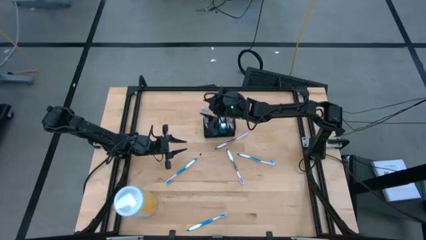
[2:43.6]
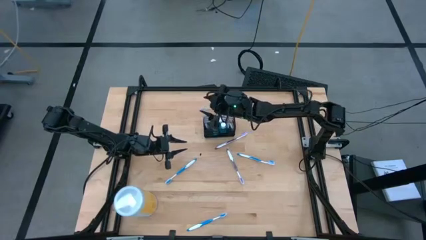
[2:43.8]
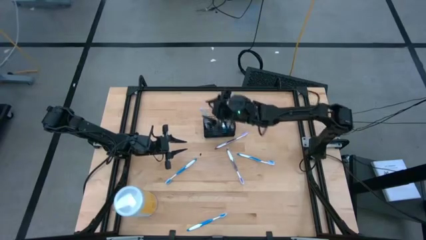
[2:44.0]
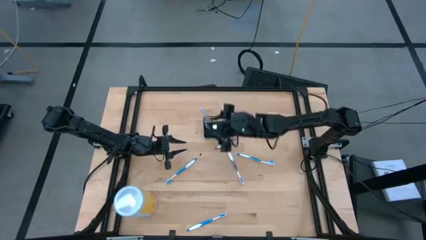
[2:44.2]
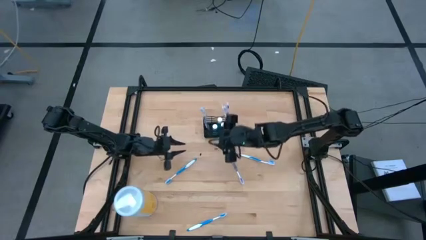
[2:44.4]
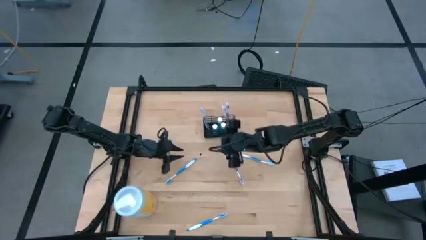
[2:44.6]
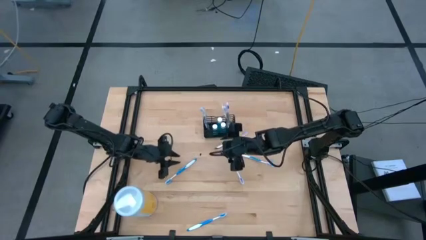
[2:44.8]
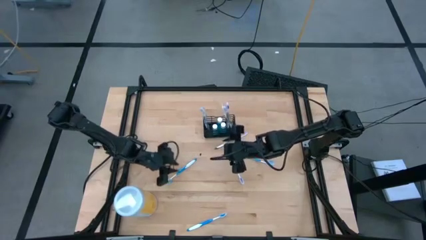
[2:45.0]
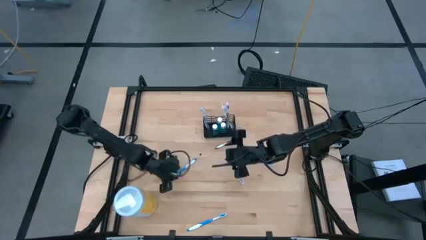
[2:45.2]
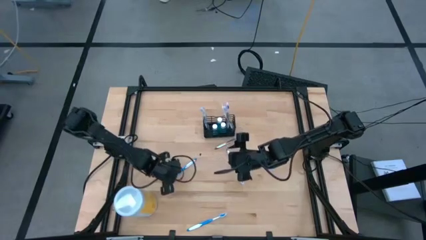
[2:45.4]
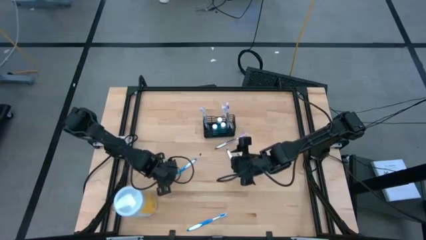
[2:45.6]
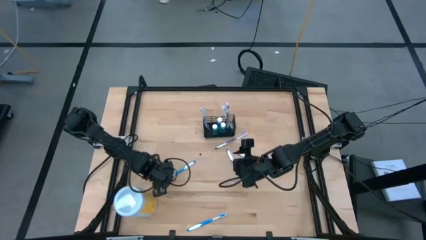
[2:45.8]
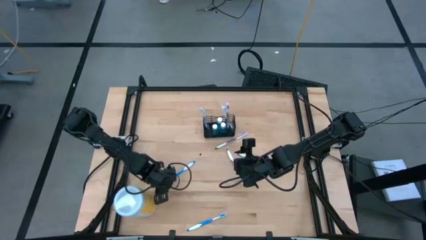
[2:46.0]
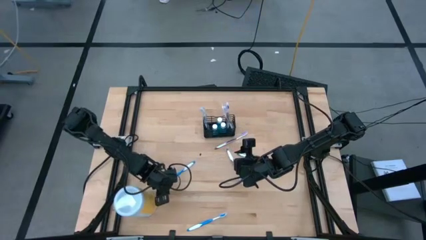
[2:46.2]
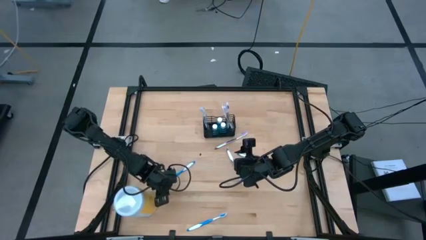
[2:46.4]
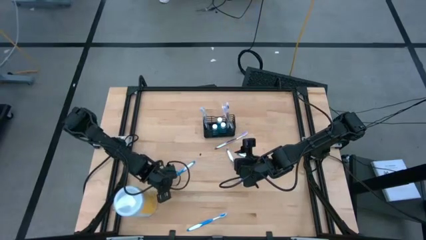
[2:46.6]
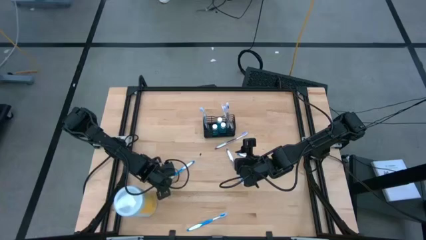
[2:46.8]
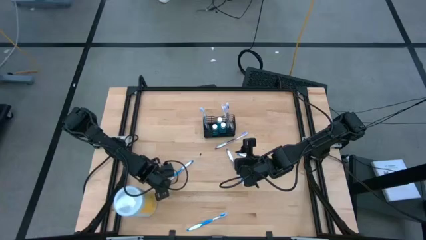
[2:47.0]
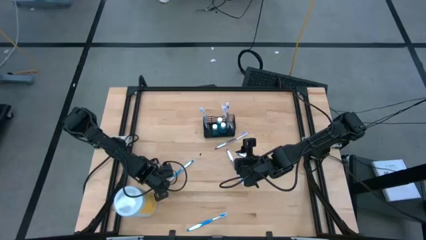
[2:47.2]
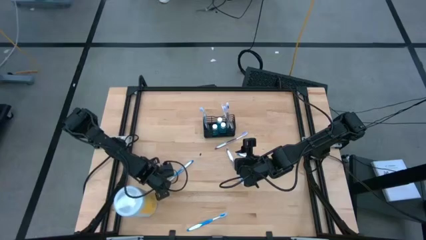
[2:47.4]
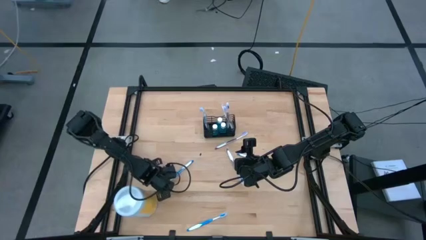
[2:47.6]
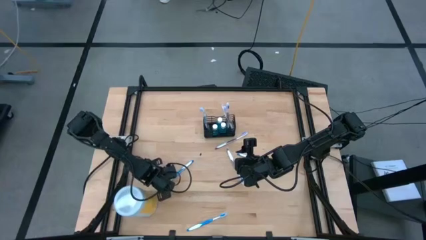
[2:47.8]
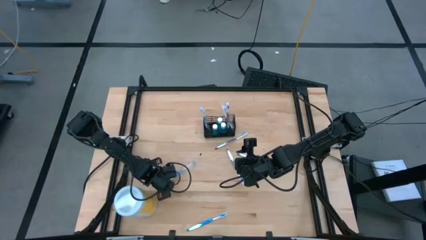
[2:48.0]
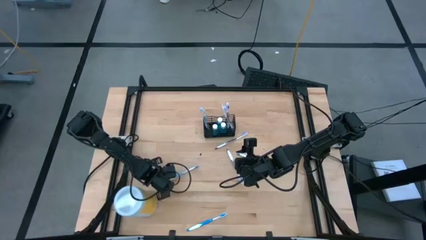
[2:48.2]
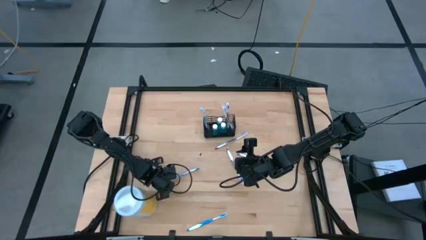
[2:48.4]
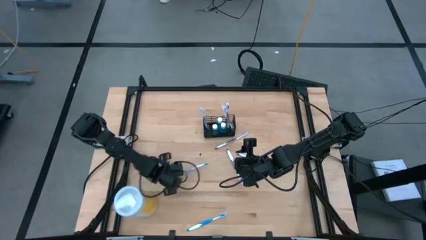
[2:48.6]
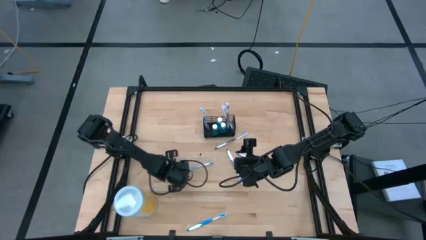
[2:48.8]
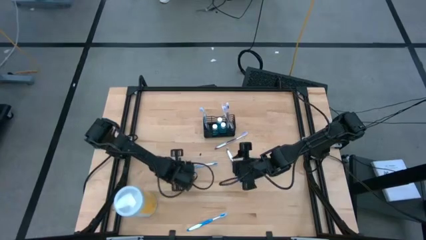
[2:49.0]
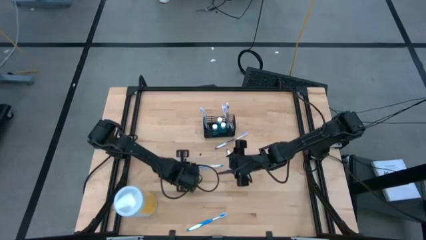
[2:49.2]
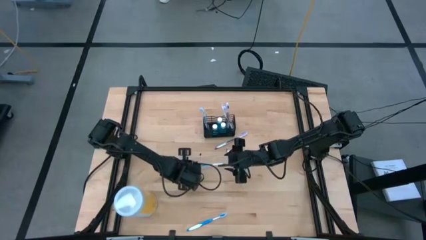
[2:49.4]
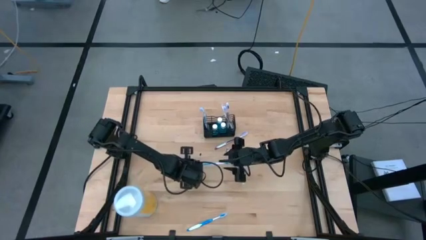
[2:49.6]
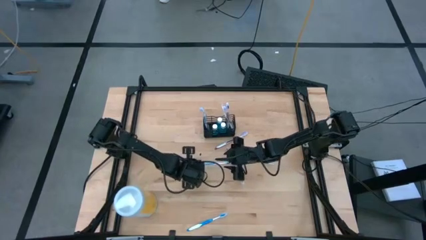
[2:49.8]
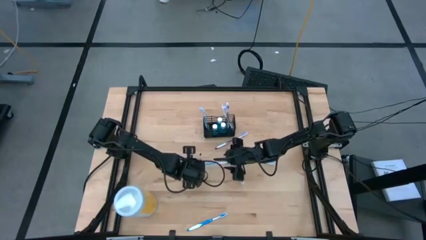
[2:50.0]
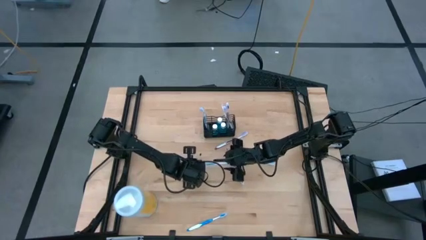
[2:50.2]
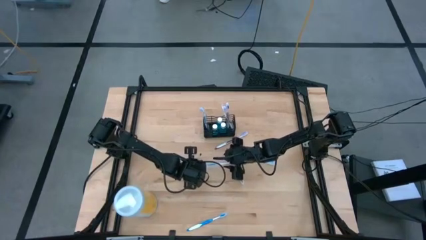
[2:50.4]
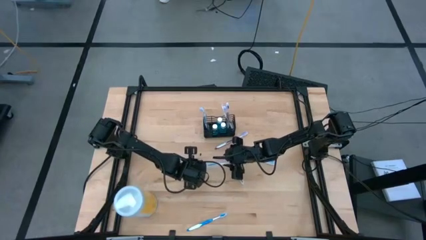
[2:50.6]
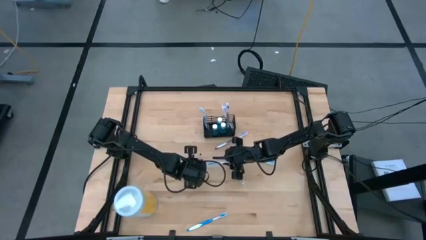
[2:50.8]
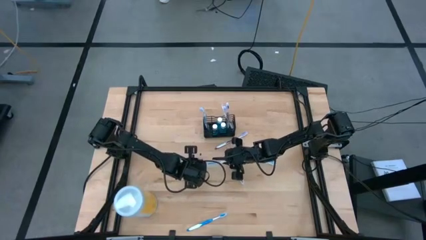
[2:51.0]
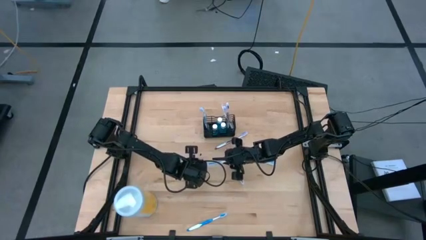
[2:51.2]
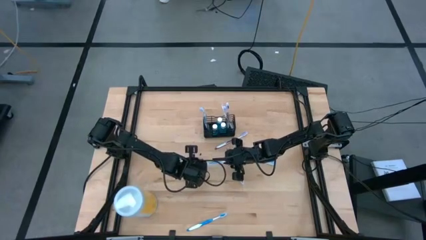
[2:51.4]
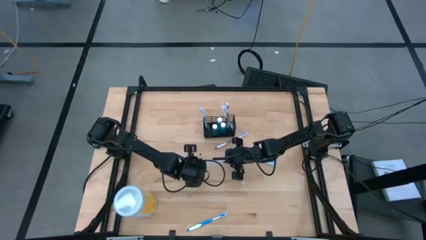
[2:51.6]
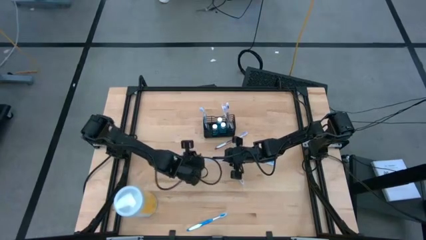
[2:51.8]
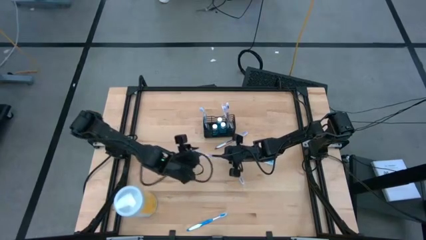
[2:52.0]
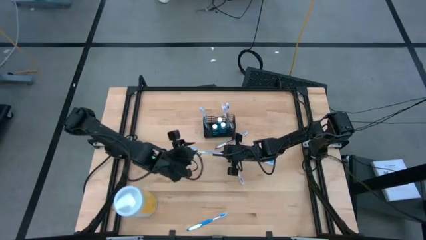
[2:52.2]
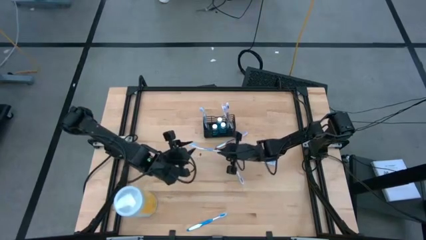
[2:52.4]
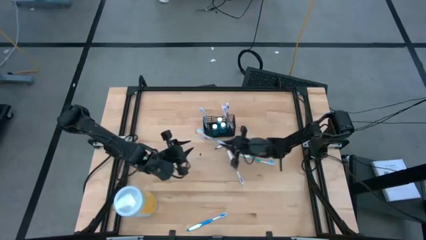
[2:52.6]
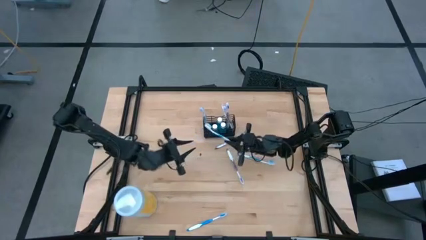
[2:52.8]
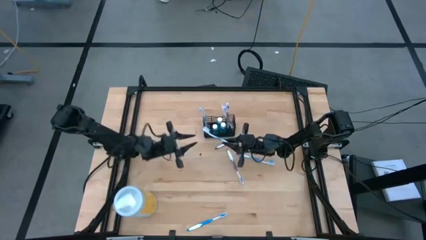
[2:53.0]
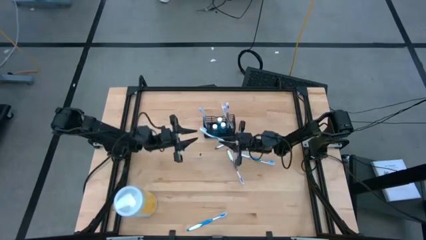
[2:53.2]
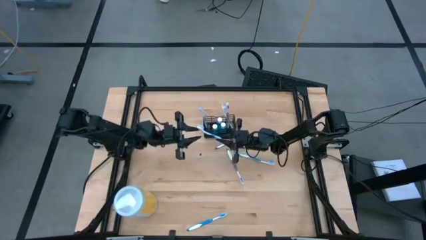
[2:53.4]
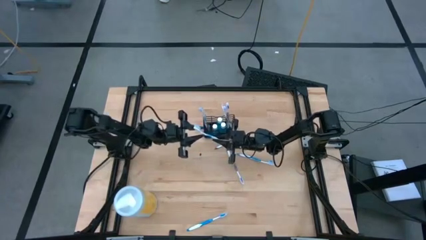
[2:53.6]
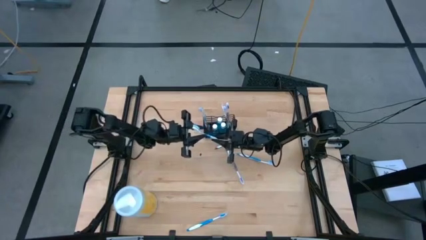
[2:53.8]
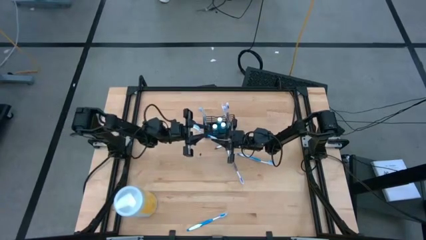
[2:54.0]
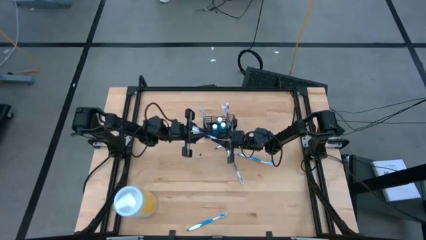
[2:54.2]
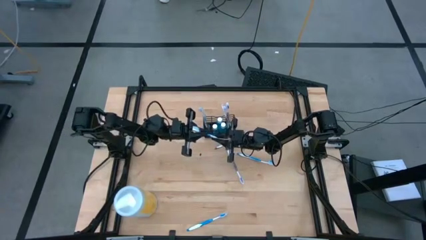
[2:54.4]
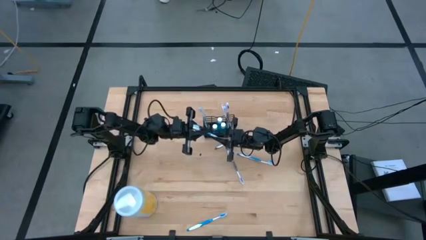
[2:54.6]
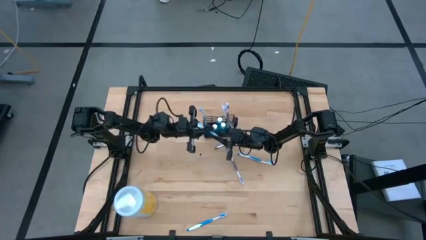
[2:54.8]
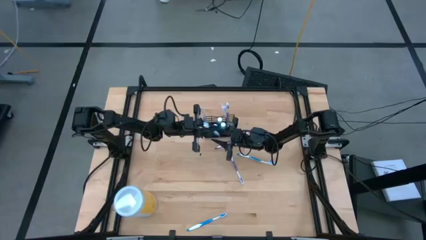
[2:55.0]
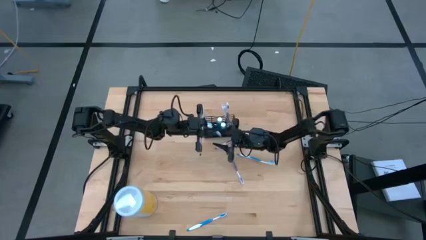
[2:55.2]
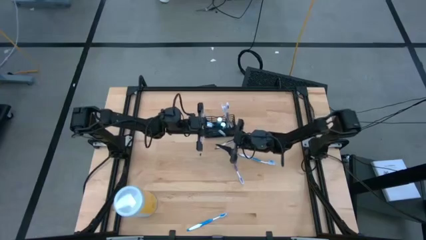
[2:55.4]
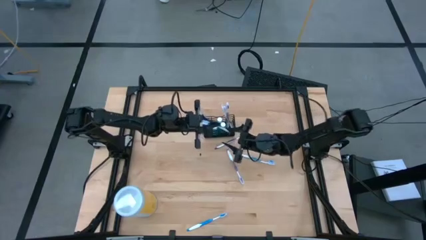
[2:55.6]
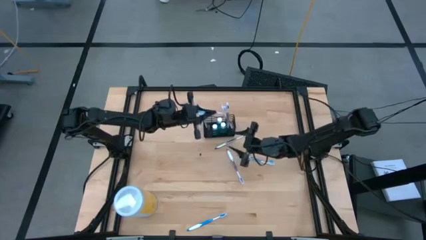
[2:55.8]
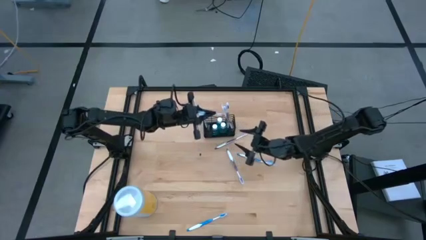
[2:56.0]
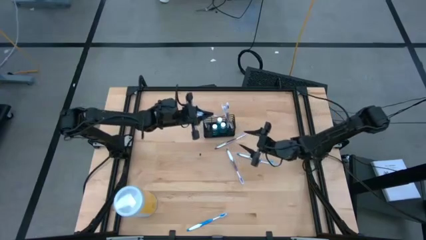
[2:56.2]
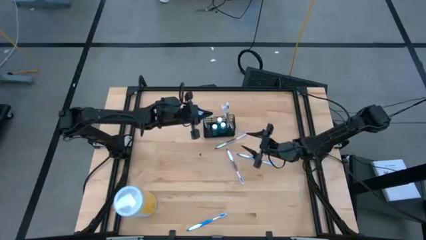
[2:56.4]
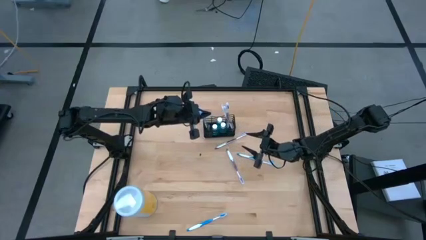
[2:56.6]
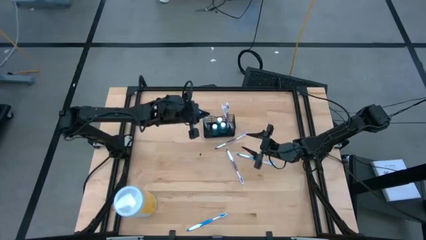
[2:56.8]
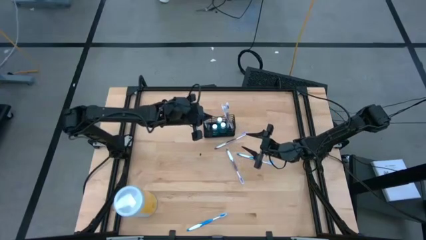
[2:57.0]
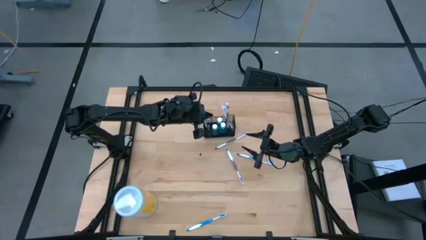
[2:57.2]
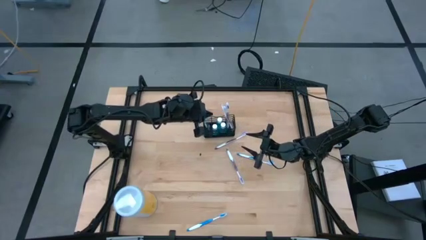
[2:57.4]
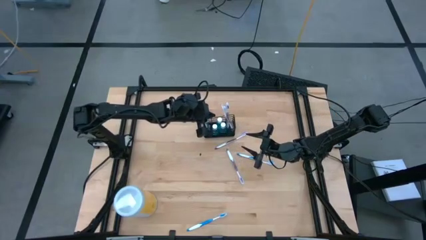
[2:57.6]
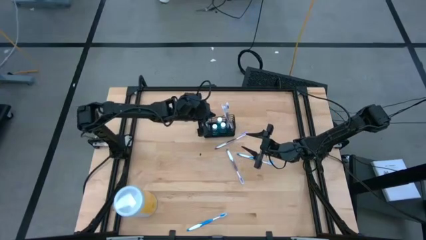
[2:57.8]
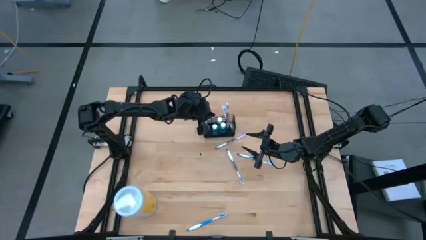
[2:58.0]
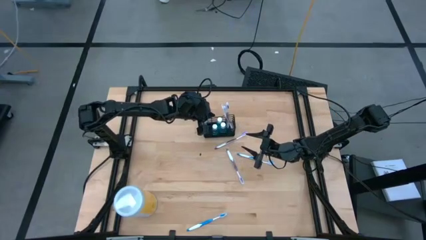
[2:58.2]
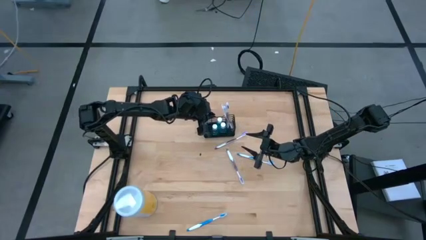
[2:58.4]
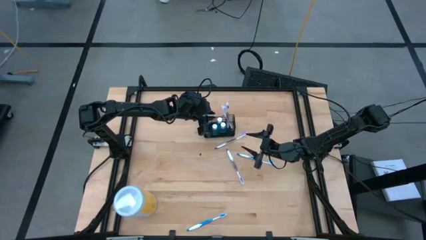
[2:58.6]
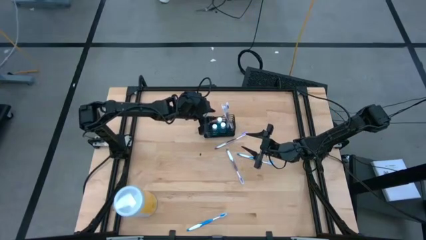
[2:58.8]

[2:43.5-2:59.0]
Task: Pick & Place toothbrushing station
Put the blue toothbrush into the black organizer
